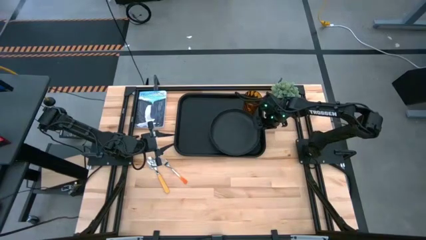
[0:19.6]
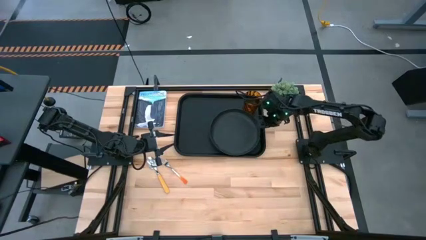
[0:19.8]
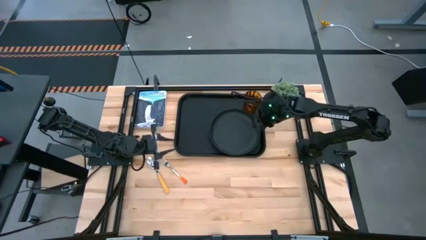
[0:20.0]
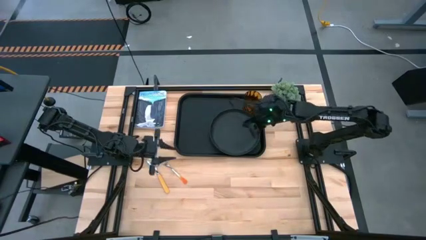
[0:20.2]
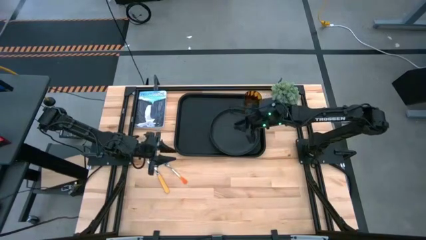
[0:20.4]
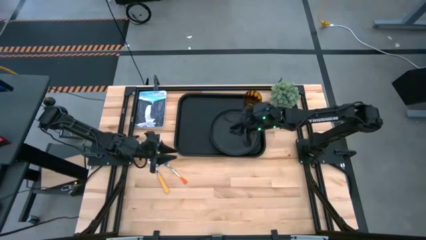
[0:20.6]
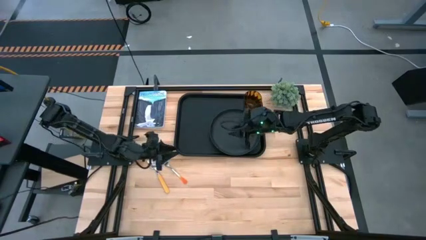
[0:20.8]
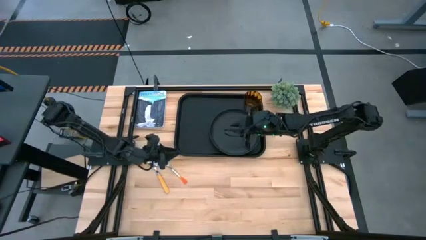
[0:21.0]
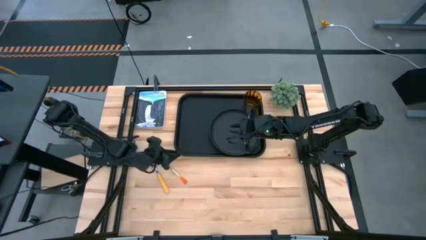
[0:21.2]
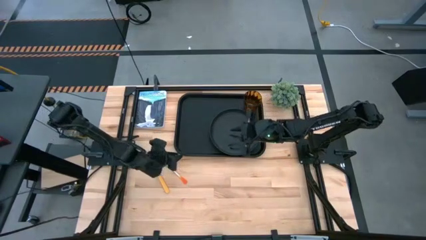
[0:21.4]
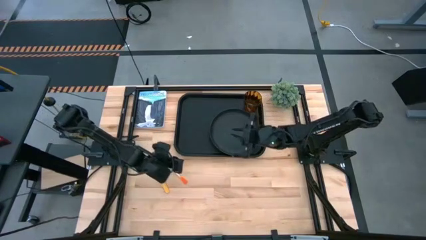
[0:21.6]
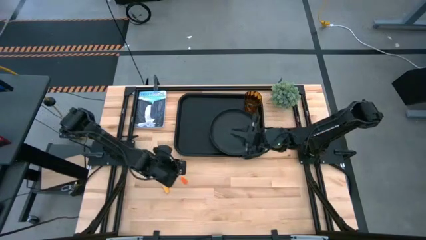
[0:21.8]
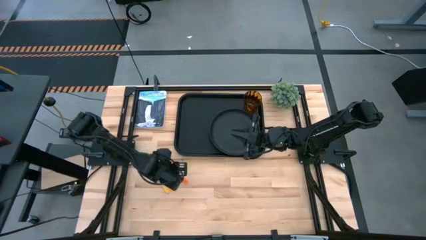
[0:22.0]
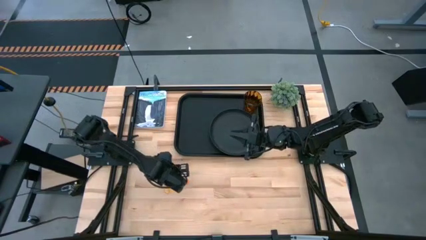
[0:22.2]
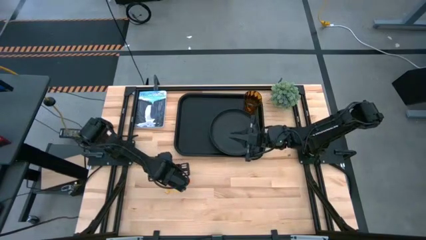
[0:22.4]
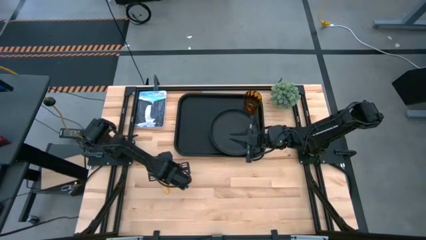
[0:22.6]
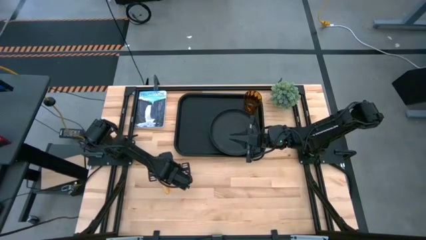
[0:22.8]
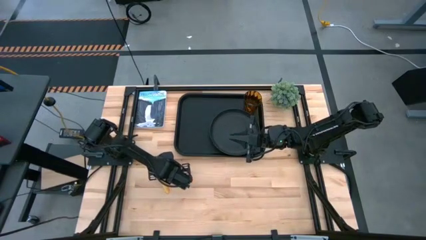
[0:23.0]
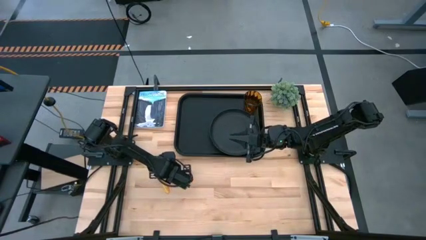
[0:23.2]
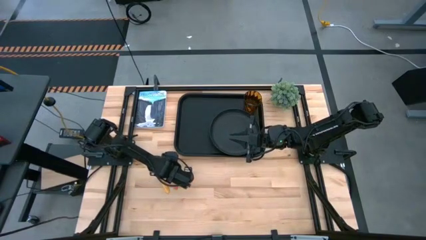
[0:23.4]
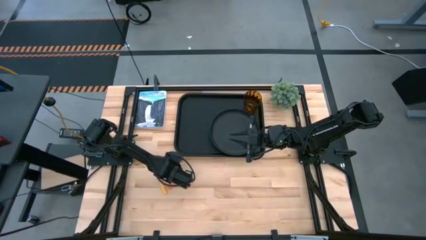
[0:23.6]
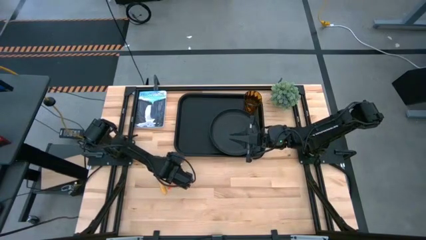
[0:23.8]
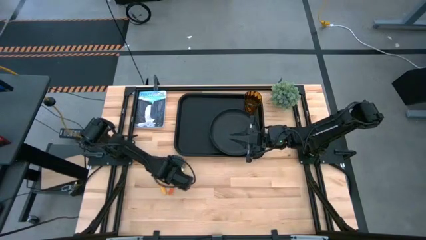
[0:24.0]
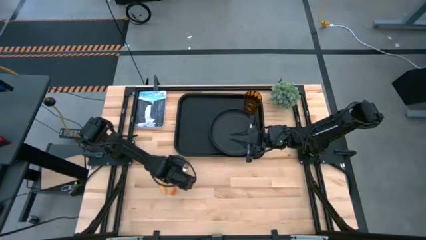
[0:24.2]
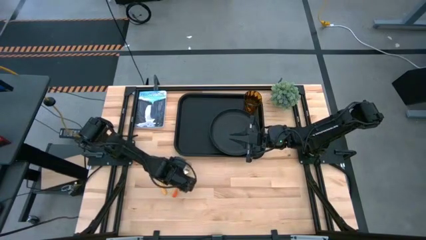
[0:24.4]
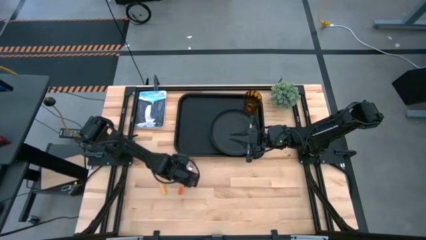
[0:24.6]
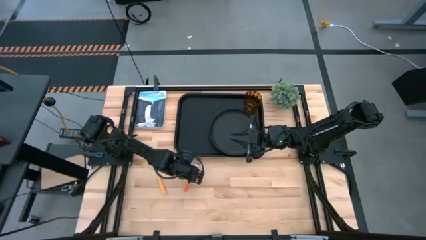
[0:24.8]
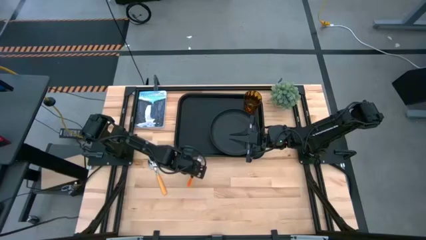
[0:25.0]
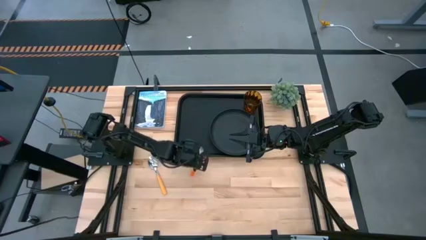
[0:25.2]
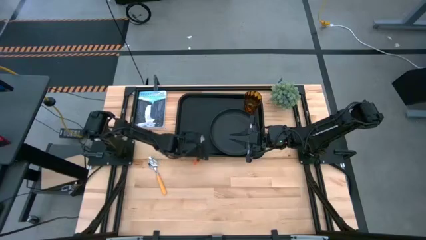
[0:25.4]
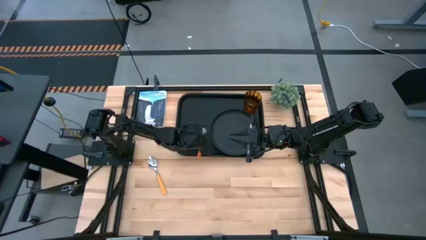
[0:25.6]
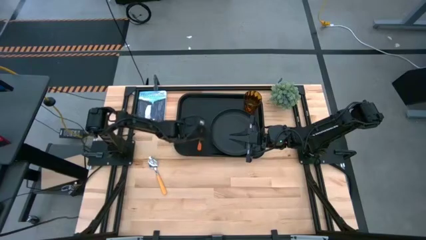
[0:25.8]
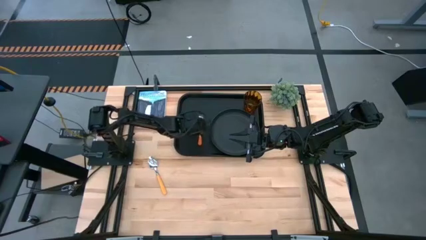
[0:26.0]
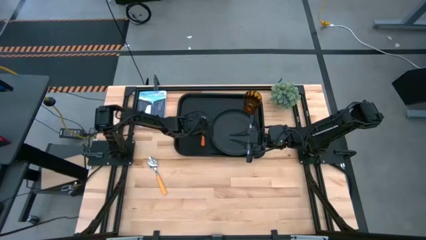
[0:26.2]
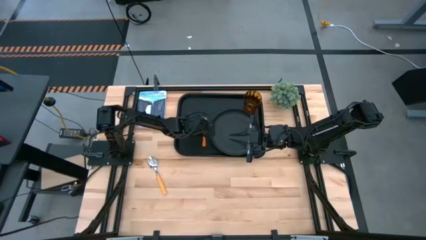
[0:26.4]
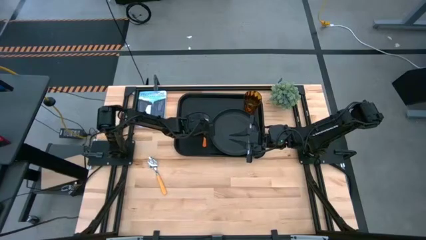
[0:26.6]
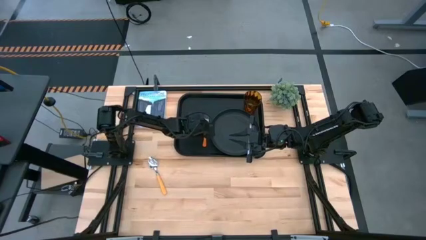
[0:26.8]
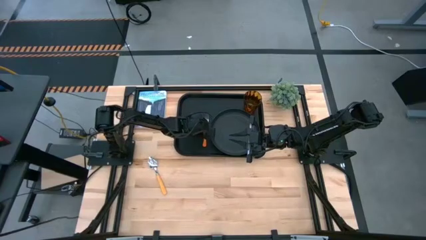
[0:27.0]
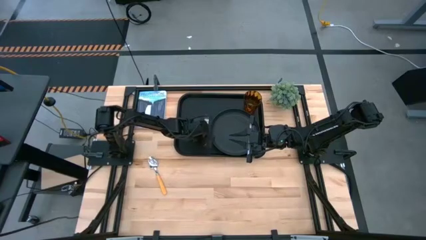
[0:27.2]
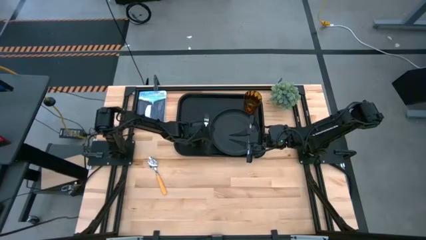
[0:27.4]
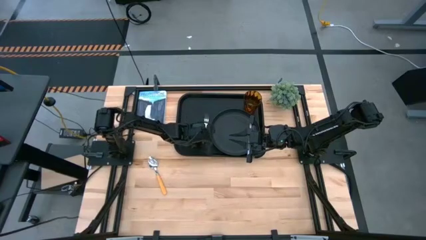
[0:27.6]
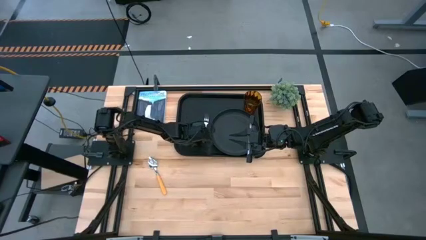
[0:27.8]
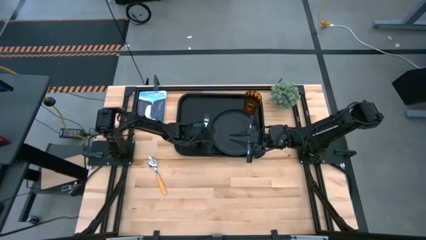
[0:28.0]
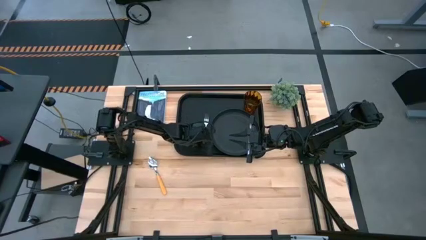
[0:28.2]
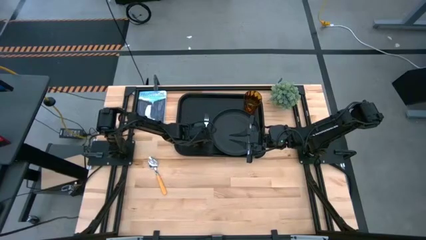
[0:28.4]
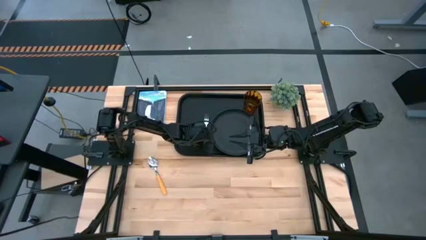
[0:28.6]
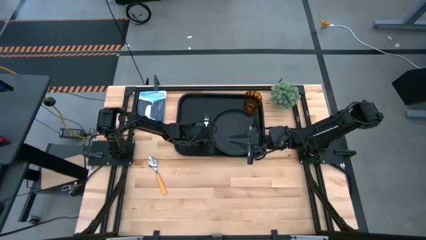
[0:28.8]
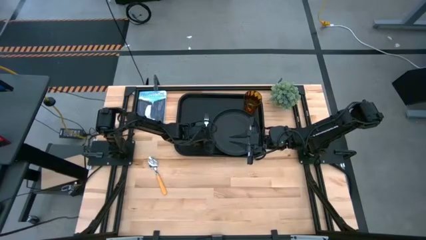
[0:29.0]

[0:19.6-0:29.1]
Task: Pick and place plate/cup/fork/spoon on tray
Put the orange fork on the black tray to the left of the black plate

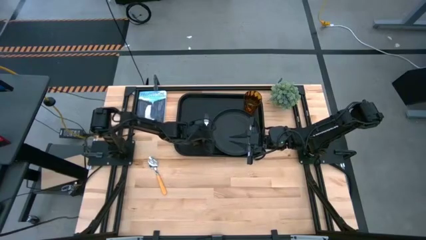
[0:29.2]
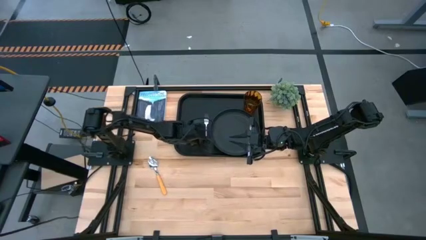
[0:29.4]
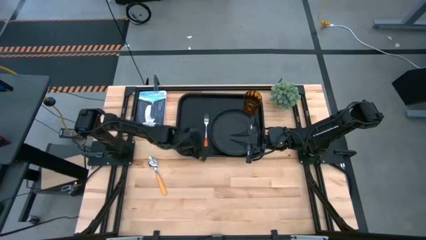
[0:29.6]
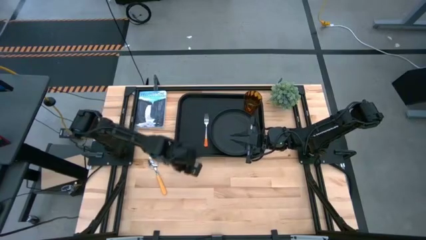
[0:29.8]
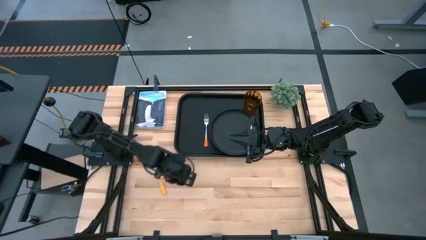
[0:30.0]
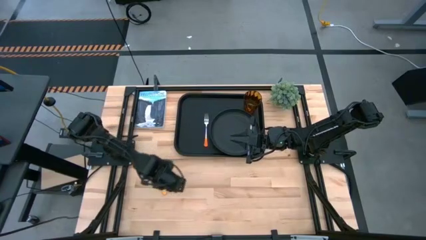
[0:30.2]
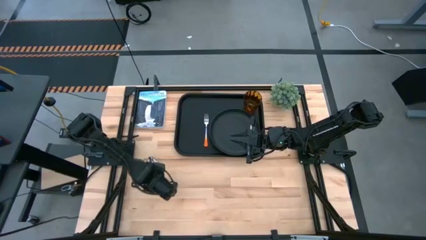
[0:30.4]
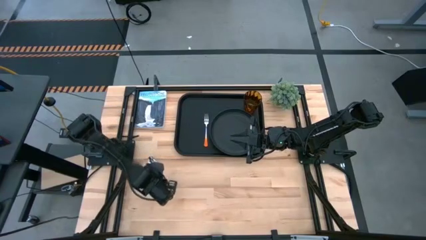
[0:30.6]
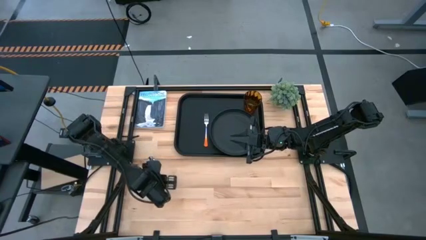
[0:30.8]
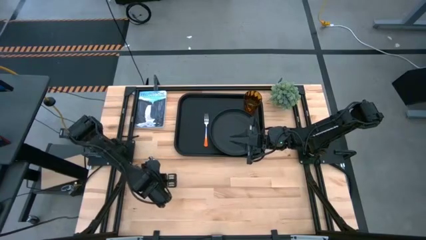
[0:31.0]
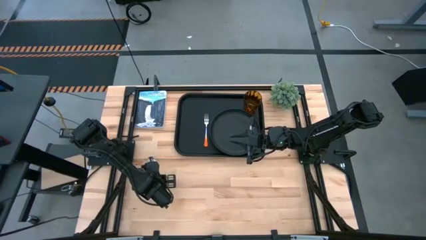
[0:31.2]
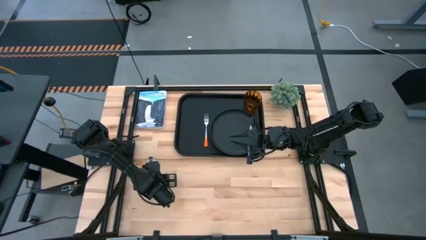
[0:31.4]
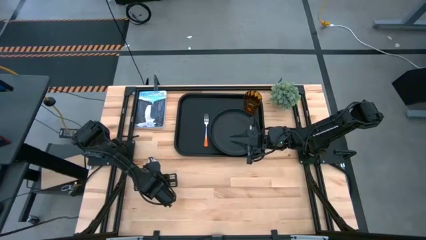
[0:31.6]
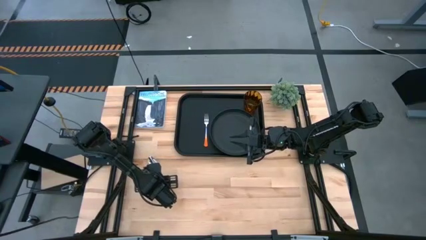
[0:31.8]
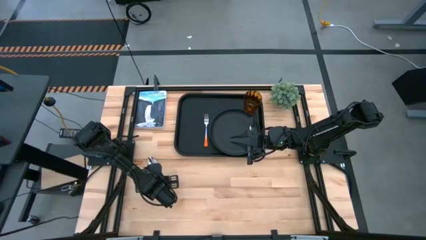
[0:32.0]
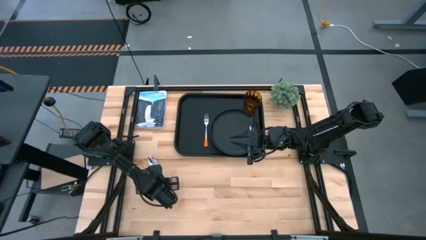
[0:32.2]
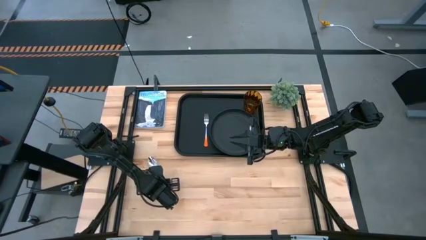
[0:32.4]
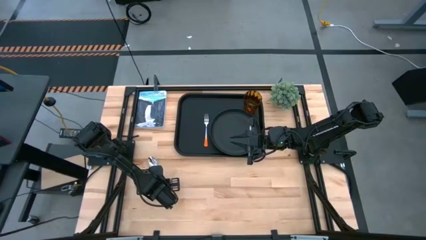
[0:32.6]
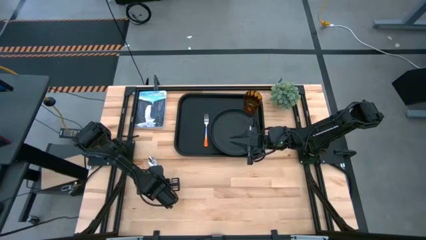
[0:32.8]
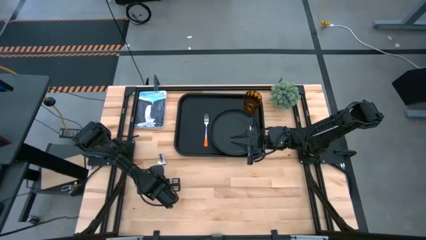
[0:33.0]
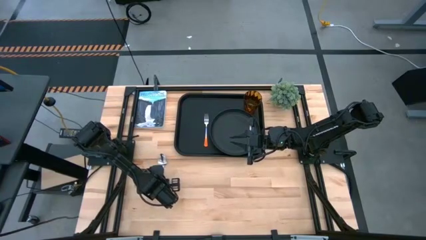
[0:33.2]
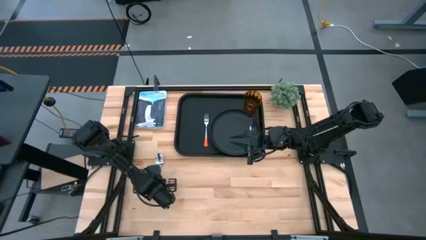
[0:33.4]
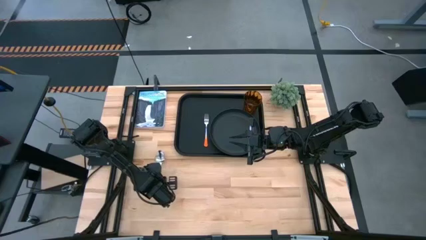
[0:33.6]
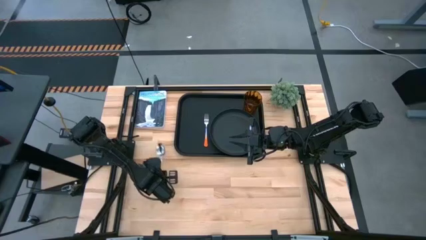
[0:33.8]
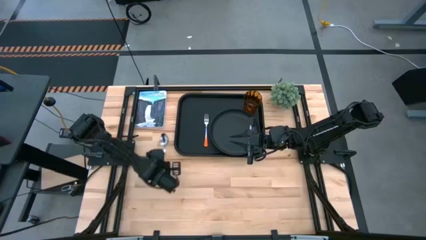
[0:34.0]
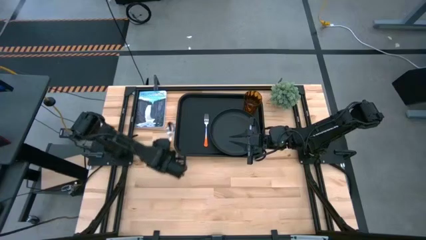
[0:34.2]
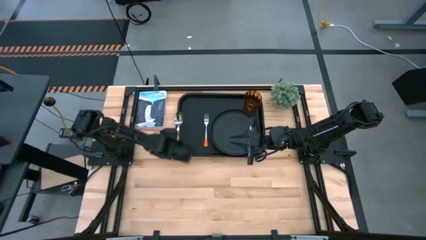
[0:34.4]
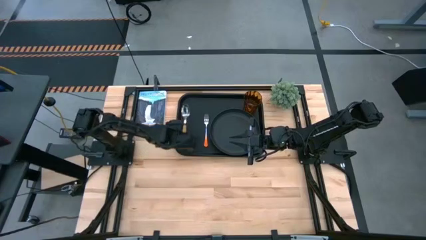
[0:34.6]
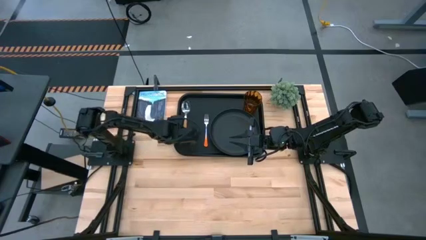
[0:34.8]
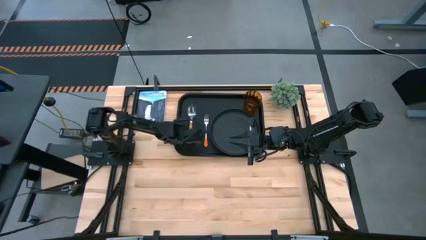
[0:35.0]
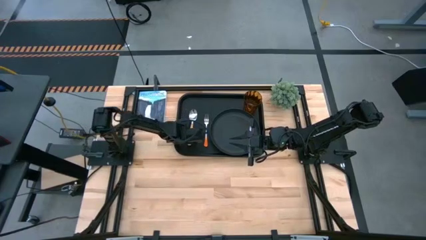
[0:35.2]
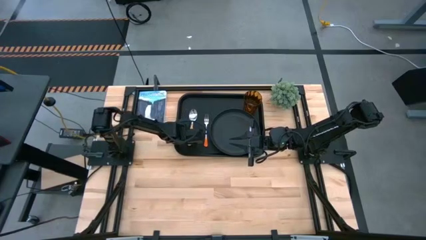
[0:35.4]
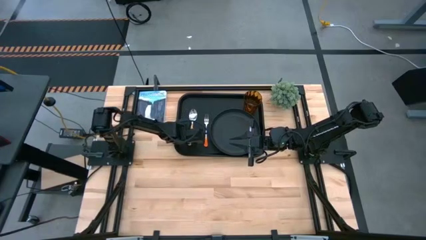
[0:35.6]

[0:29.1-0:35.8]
Put the yellow spoon on the black tray to the left of the orange fork

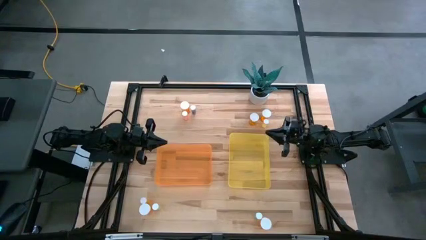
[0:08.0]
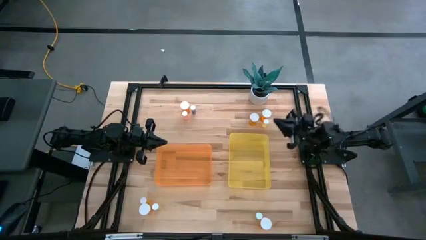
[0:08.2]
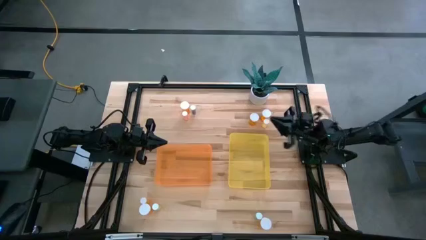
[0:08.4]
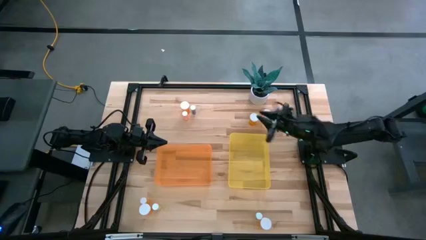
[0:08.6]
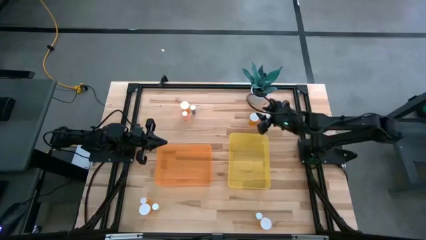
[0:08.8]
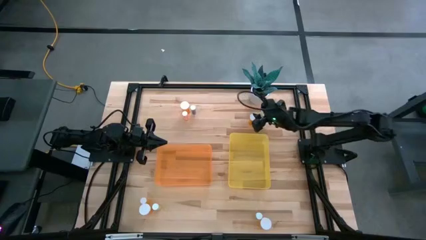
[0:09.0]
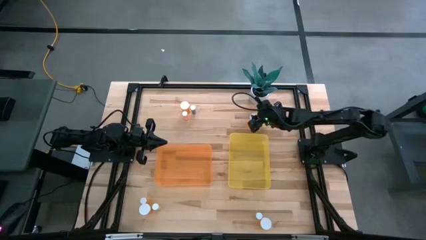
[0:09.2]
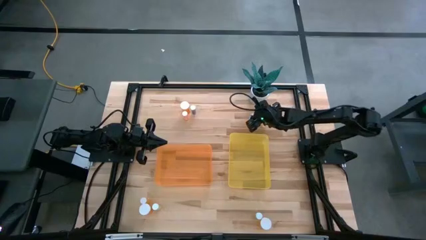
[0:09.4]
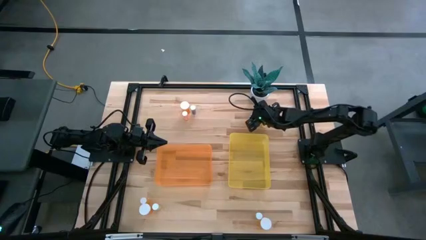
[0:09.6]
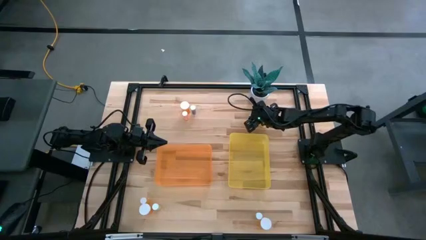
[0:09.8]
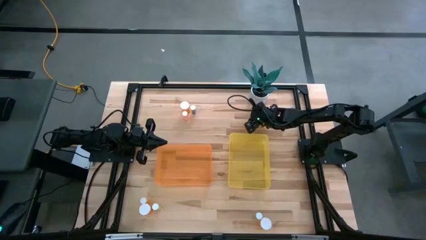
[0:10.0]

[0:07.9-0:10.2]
Task: Pick and place medicine bottles into bin by pill shape (circle, oval)
Put the orange capsule bottle into the yellow bin
